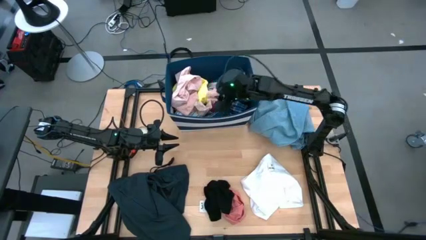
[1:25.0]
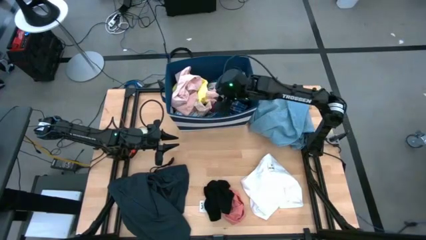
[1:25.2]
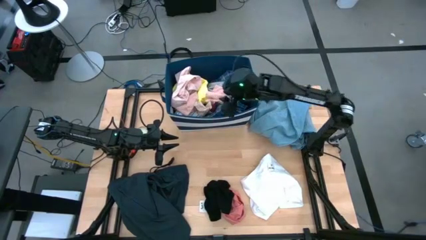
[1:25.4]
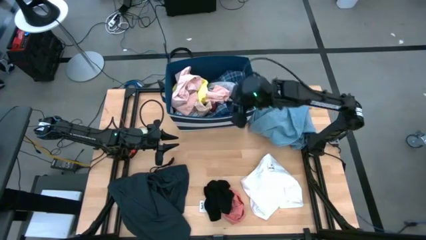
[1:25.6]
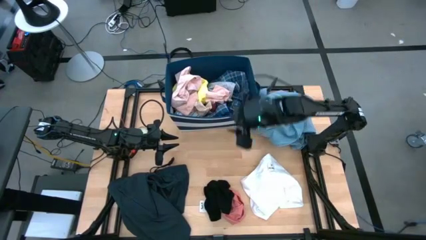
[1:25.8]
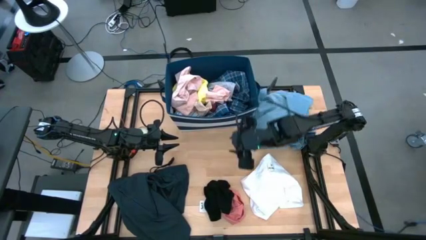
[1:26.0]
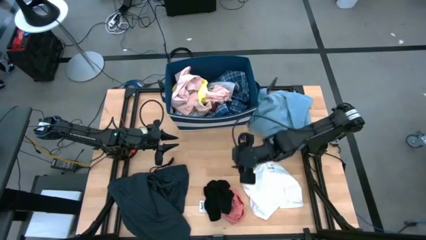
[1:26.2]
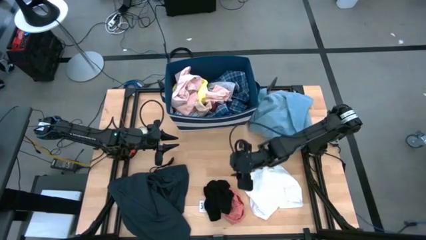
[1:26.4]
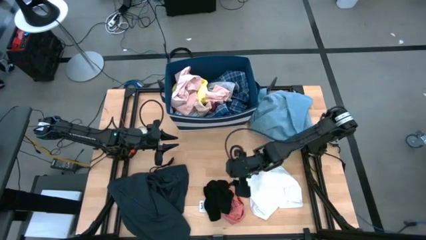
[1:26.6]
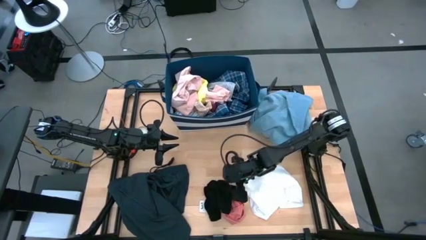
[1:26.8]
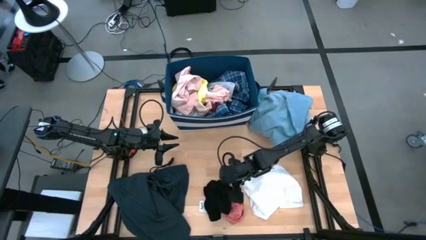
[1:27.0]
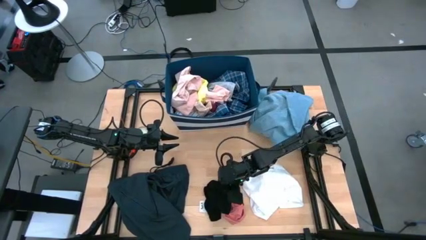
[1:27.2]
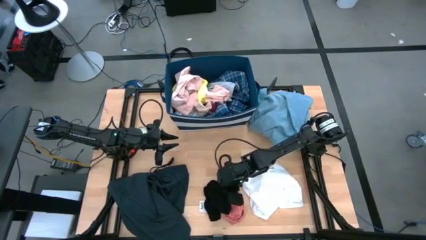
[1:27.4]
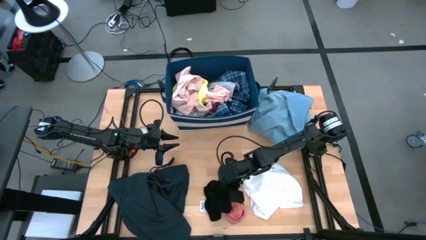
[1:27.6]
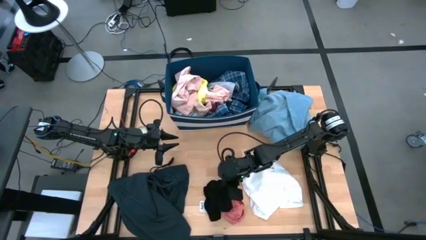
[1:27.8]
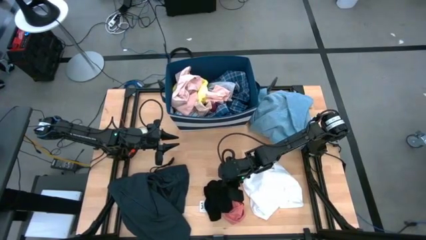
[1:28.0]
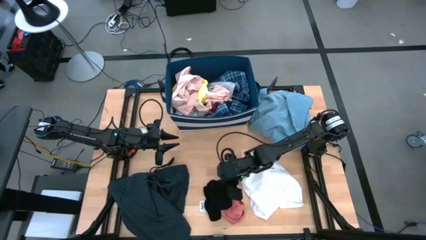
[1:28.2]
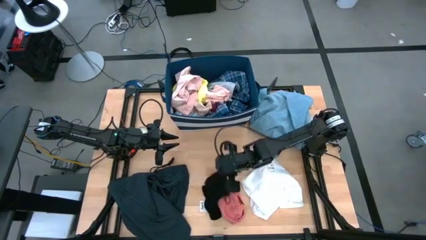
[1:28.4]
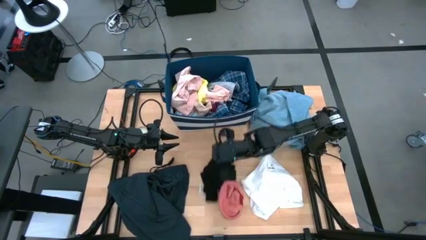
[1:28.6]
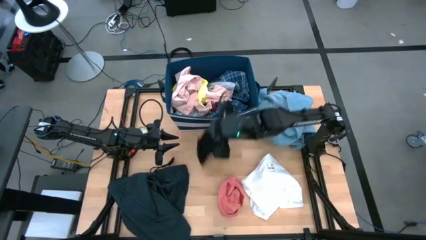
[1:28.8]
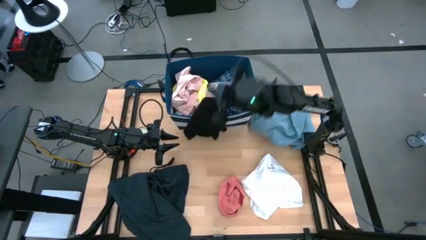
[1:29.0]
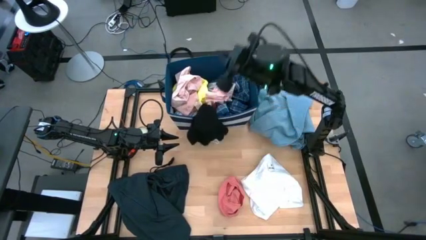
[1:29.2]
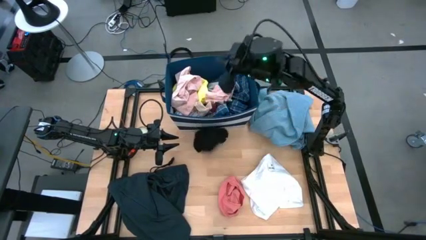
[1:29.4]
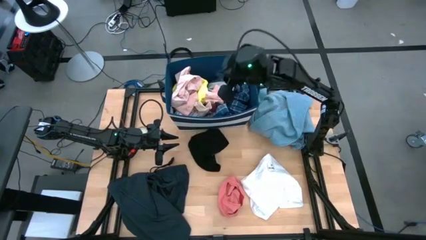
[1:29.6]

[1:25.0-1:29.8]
Task: Sort clothes
Put the black underwear into the blue laundry organizer

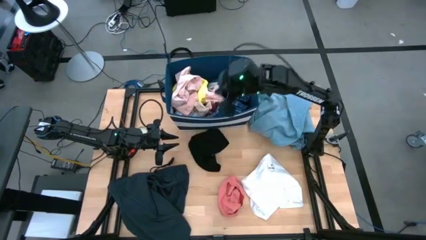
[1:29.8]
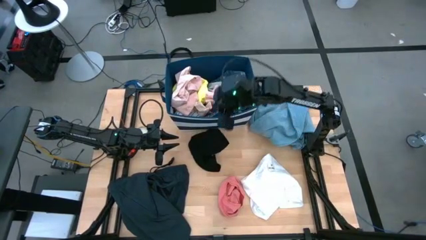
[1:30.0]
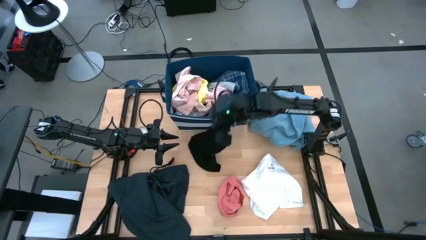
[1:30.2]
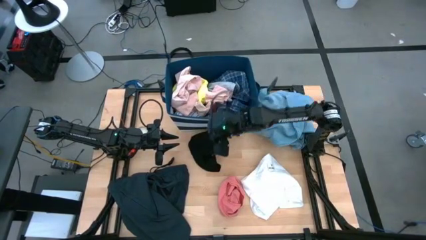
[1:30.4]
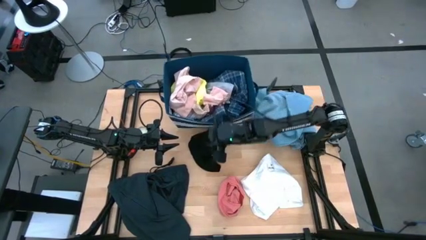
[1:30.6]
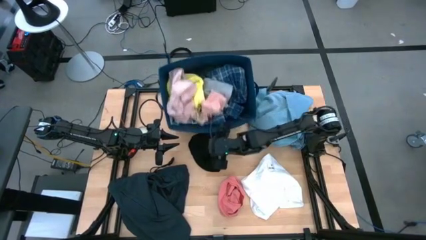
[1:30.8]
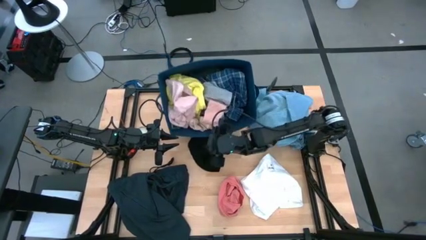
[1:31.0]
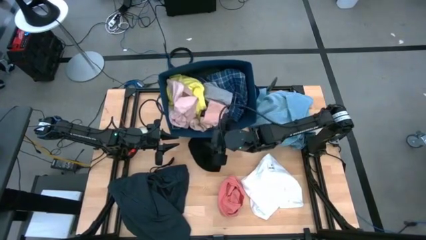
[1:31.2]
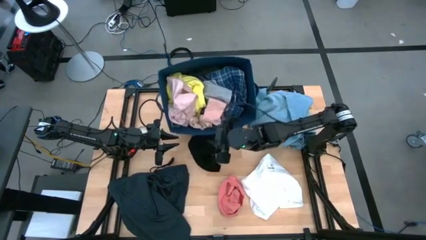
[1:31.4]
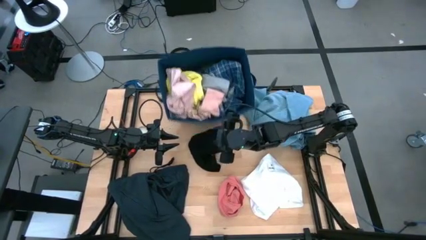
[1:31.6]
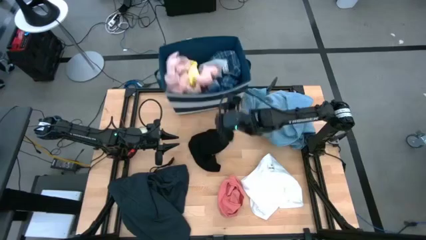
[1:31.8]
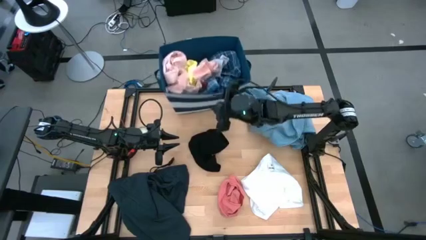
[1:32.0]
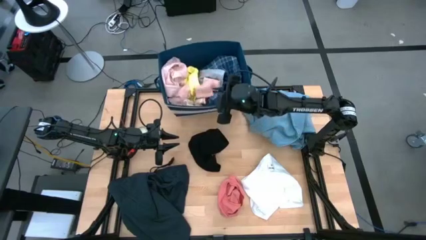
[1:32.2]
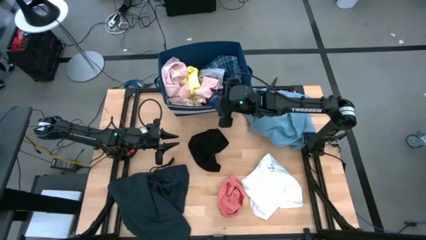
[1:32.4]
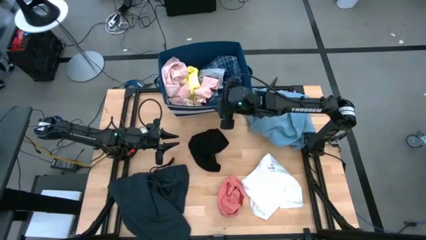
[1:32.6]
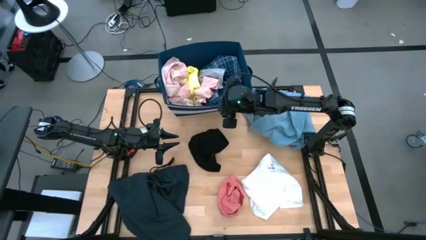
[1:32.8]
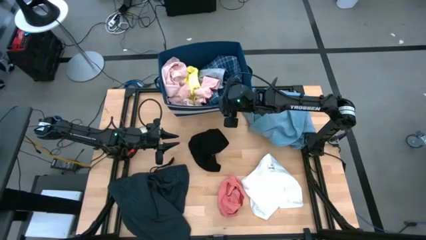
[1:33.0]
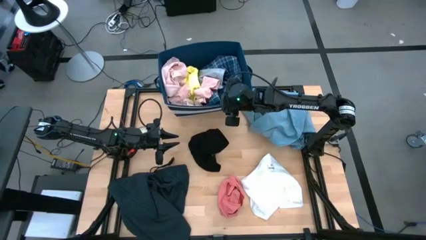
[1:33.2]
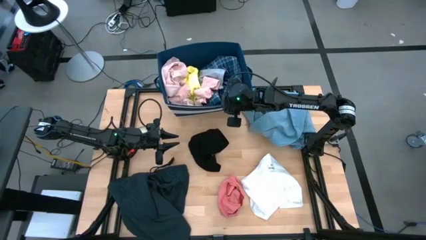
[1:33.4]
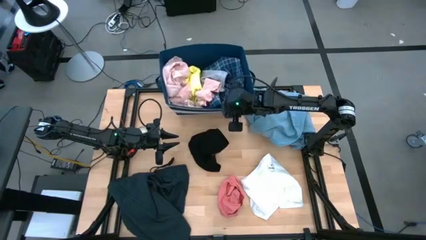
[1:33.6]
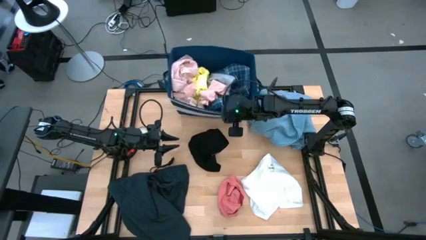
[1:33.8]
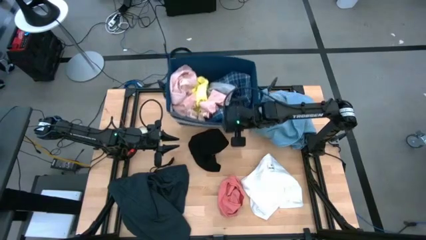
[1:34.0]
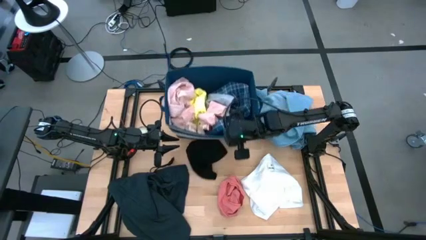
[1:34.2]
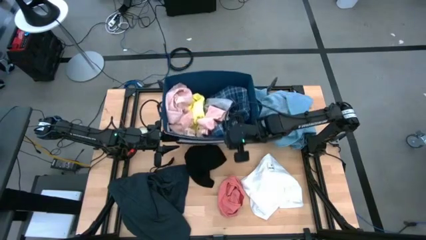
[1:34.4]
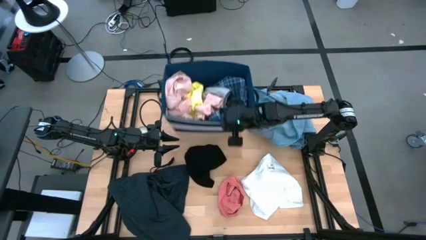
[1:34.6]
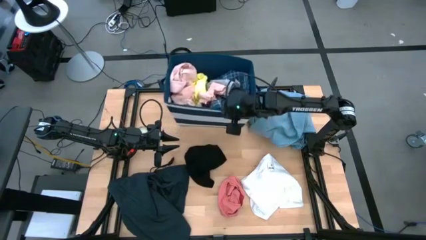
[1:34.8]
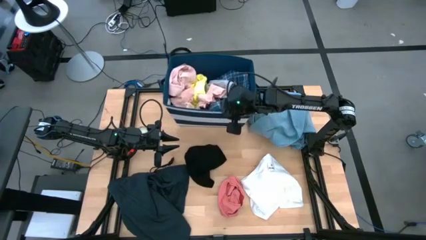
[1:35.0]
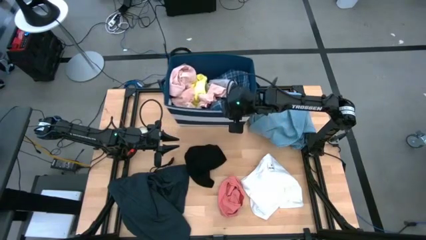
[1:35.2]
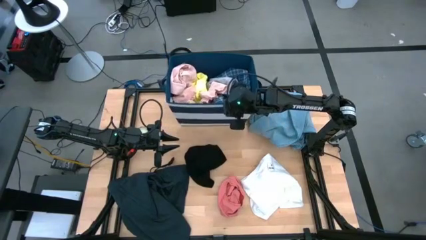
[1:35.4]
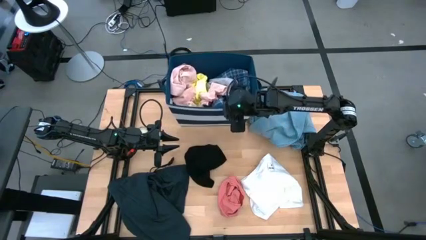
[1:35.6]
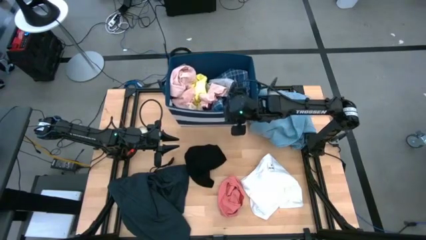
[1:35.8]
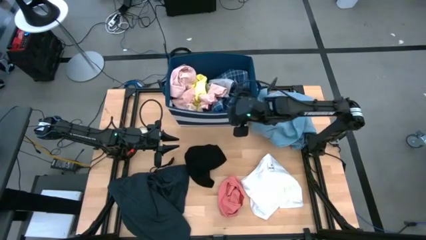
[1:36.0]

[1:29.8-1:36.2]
Adjust the blue laundry organizer

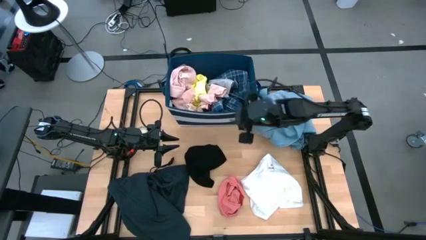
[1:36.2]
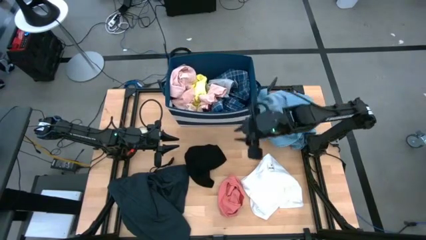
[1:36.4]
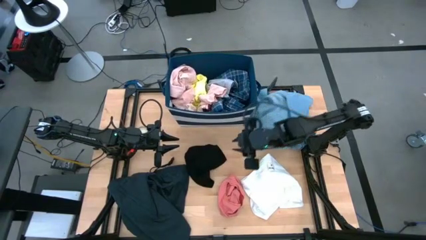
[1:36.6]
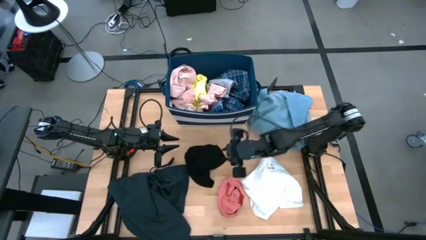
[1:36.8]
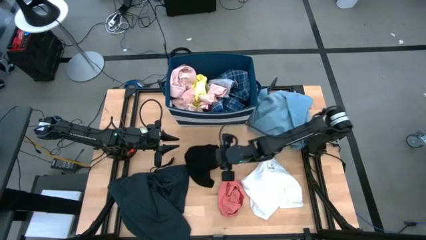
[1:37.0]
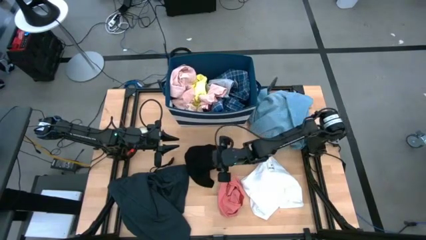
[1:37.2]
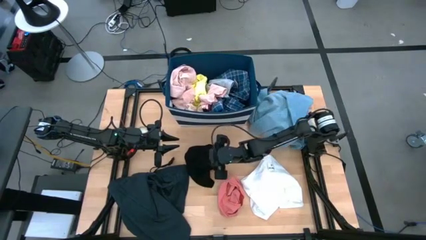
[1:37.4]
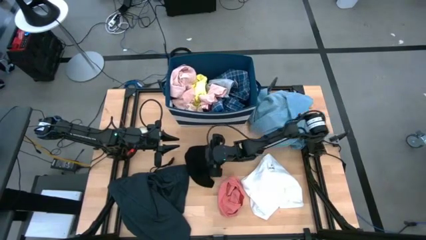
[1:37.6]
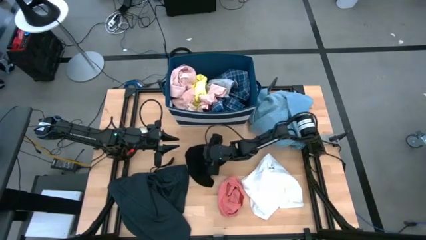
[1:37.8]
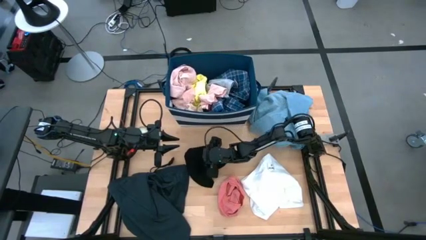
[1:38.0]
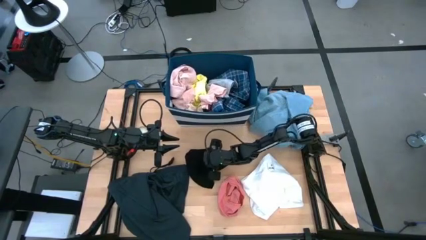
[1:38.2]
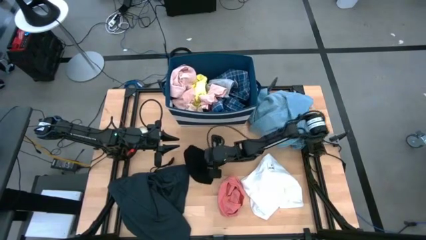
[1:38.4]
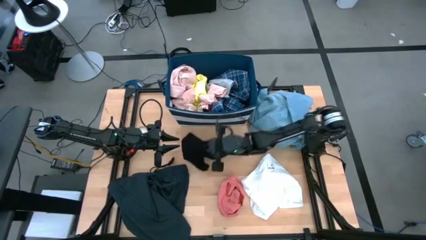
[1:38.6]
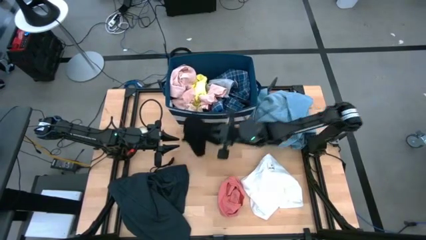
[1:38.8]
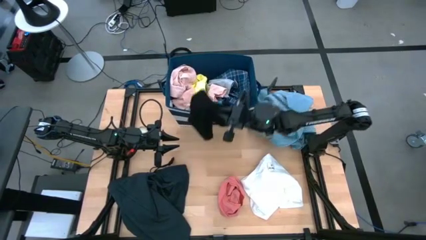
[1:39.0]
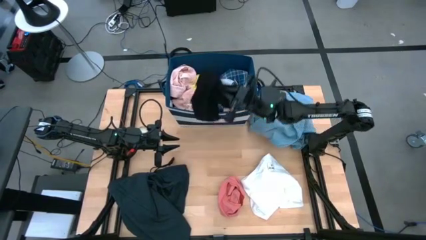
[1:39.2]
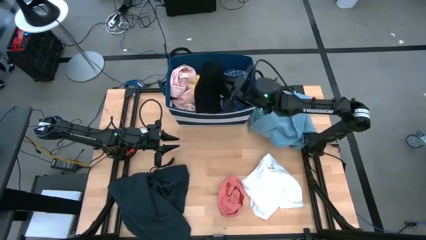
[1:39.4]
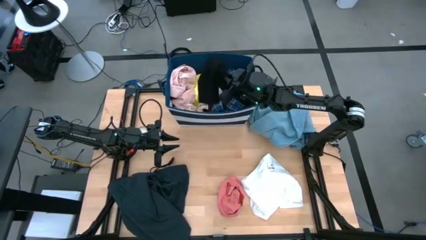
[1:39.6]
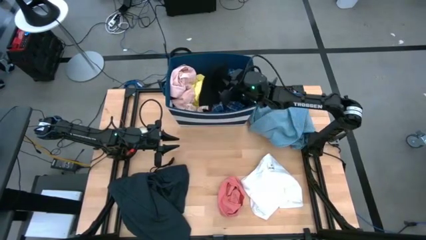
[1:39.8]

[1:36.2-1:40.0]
Put the black underwear into the blue laundry organizer

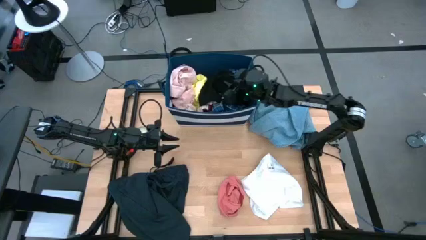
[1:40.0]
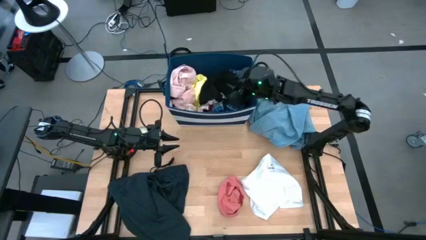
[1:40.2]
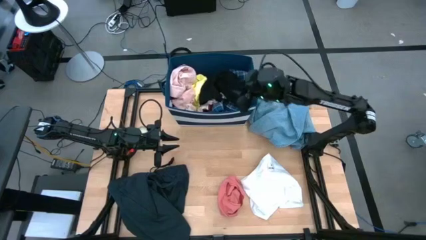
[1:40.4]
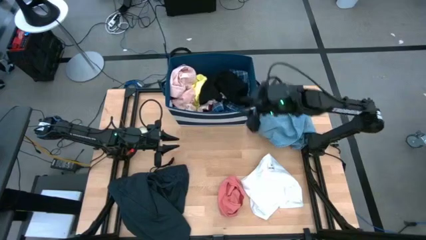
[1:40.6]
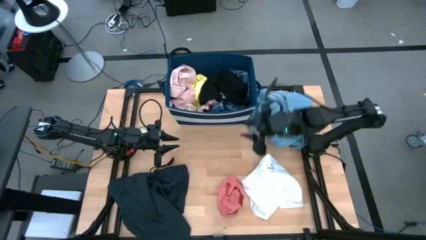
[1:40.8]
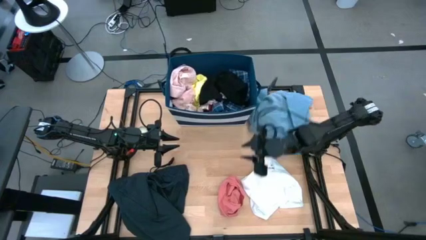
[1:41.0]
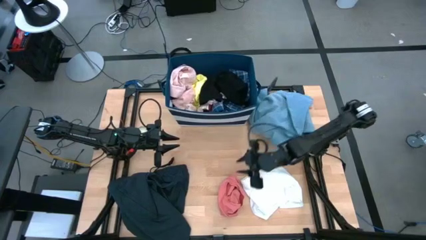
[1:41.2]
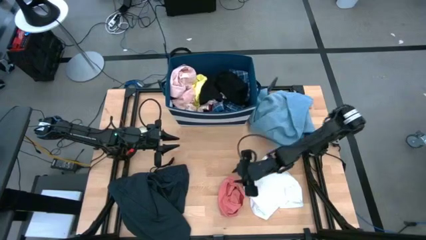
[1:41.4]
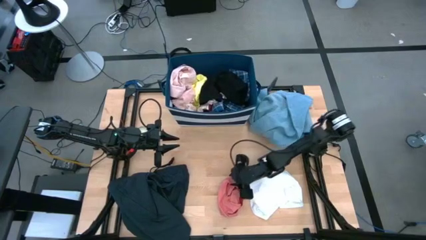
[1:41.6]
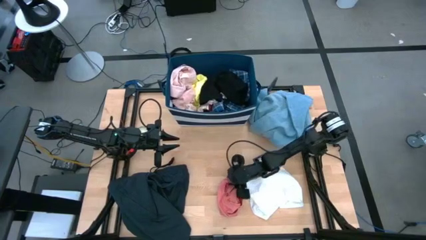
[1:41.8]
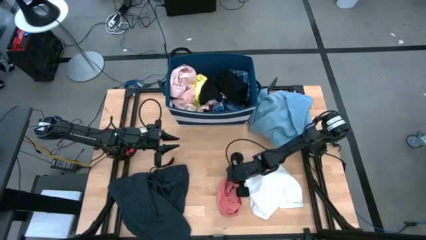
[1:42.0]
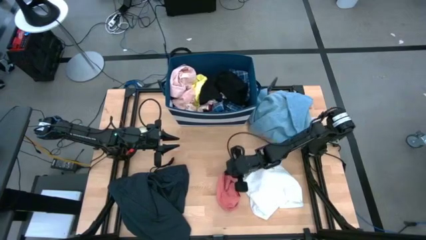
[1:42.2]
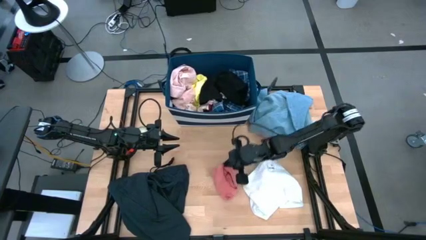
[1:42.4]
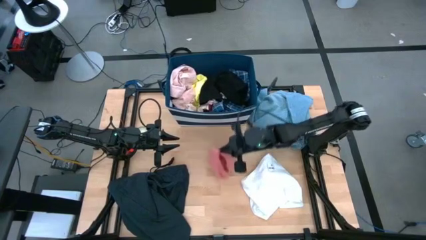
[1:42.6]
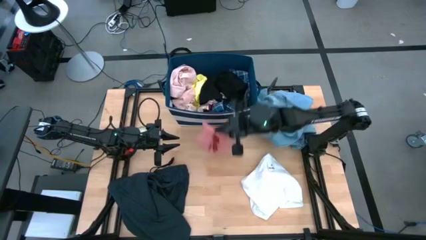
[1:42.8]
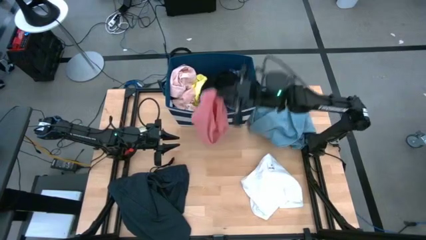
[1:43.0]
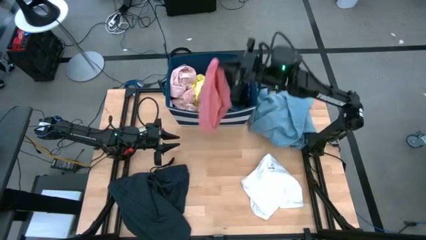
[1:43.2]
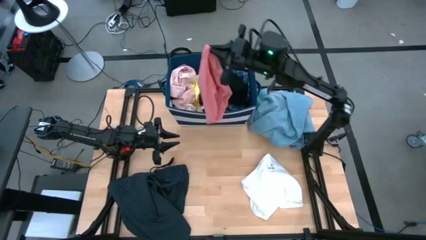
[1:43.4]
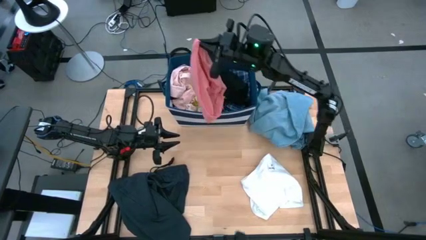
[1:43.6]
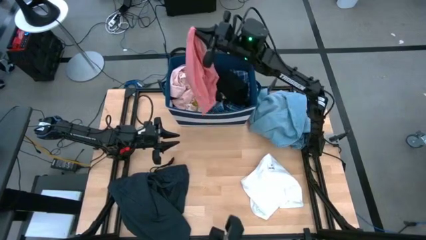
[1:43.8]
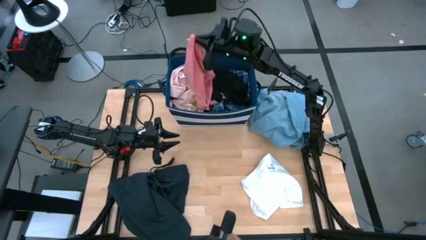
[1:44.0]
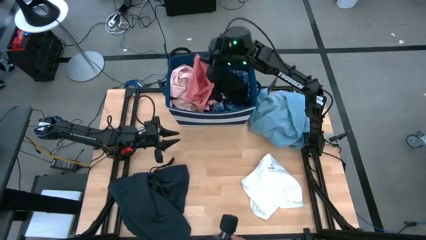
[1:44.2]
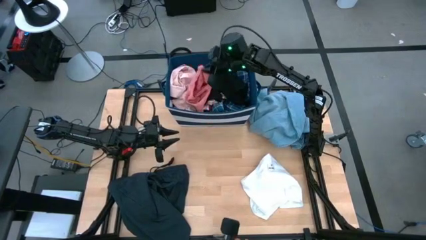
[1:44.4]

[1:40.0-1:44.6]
Put the pink underwear into the blue laundry organizer
